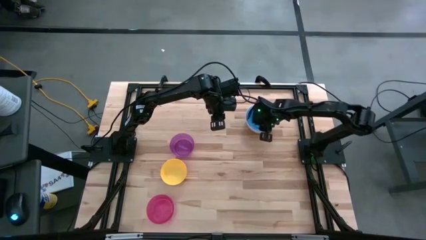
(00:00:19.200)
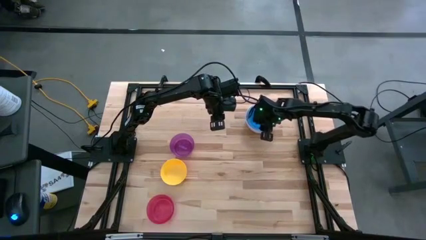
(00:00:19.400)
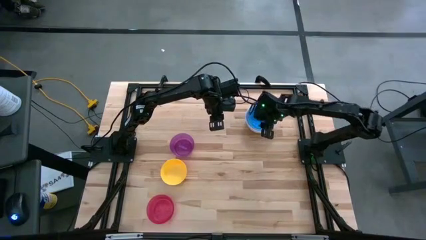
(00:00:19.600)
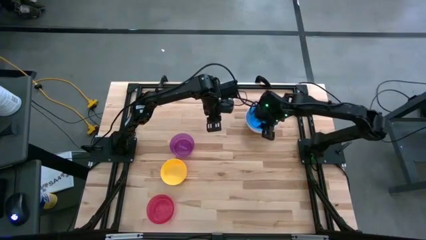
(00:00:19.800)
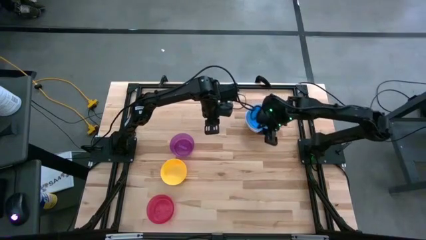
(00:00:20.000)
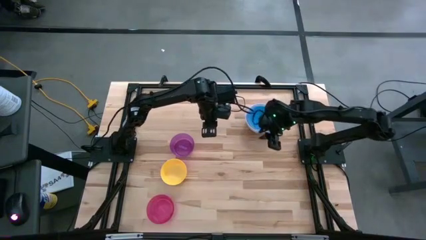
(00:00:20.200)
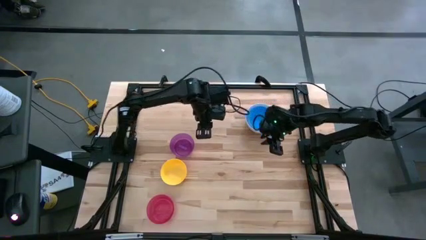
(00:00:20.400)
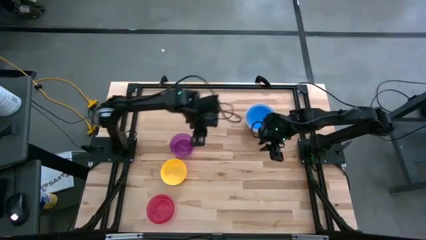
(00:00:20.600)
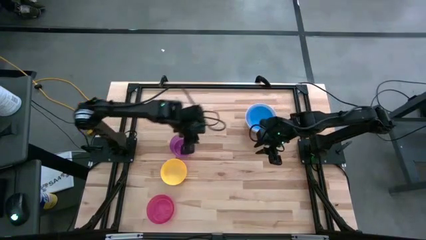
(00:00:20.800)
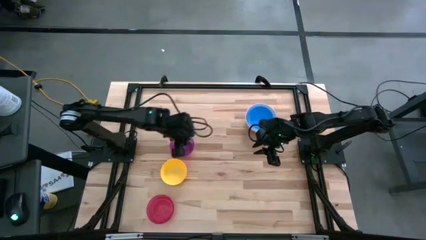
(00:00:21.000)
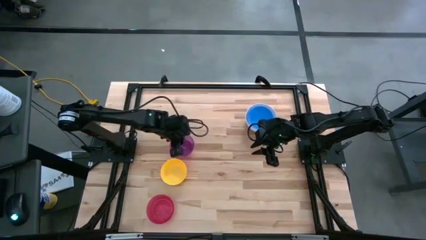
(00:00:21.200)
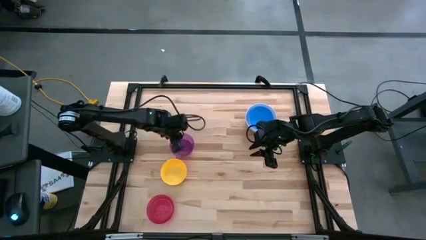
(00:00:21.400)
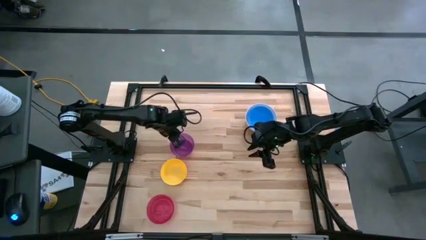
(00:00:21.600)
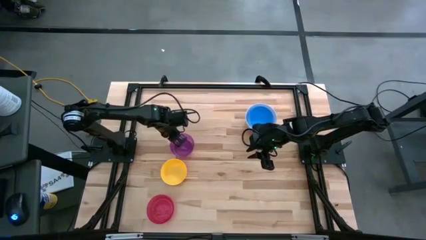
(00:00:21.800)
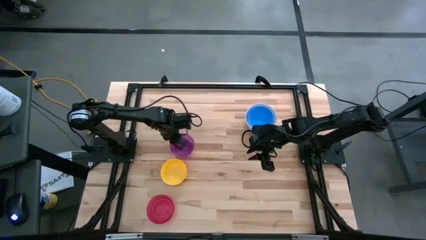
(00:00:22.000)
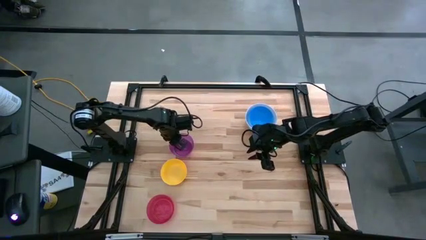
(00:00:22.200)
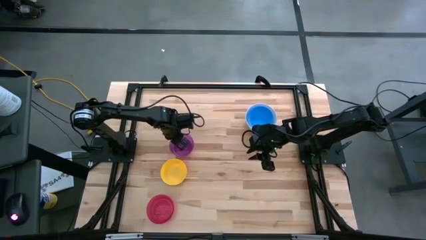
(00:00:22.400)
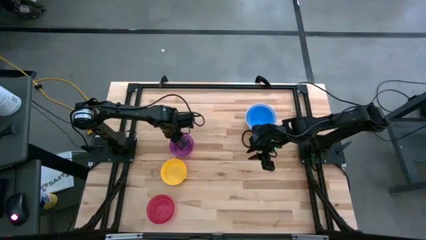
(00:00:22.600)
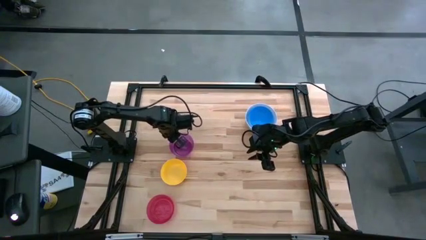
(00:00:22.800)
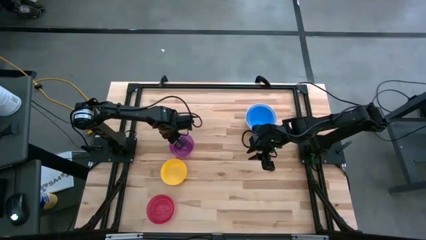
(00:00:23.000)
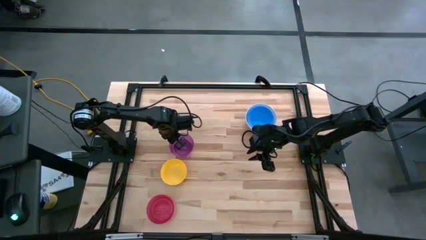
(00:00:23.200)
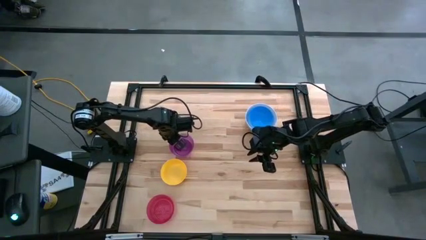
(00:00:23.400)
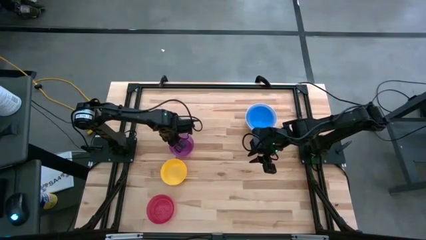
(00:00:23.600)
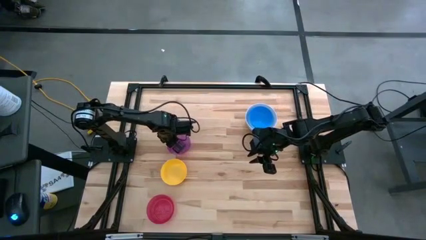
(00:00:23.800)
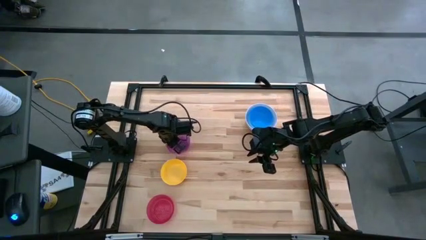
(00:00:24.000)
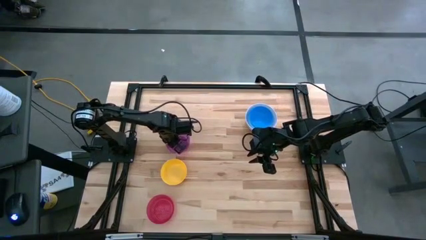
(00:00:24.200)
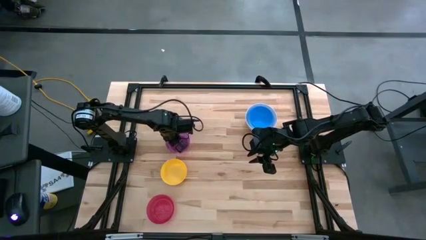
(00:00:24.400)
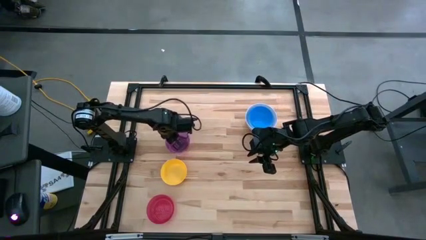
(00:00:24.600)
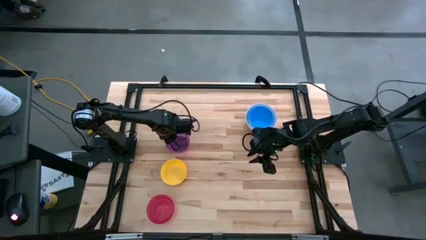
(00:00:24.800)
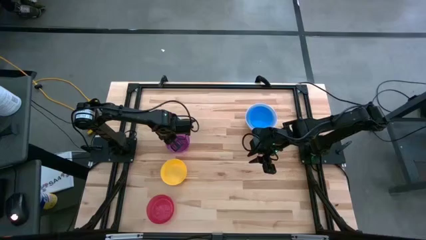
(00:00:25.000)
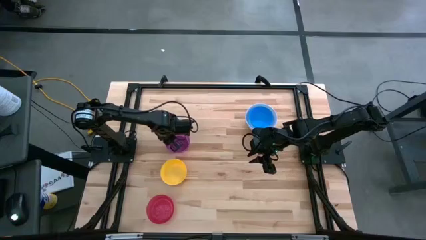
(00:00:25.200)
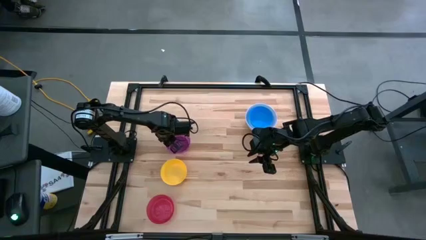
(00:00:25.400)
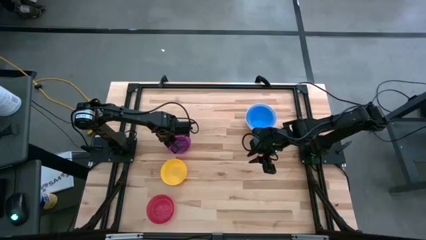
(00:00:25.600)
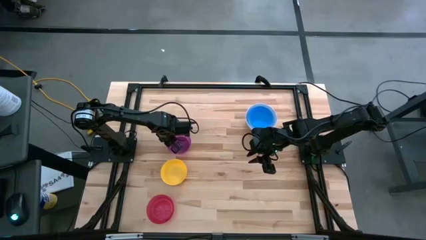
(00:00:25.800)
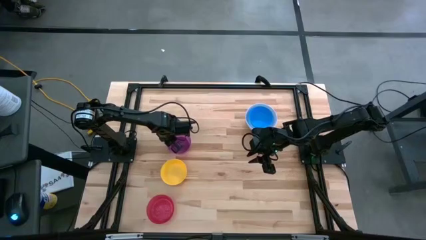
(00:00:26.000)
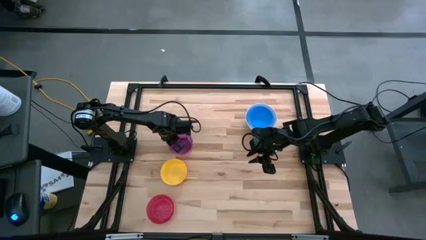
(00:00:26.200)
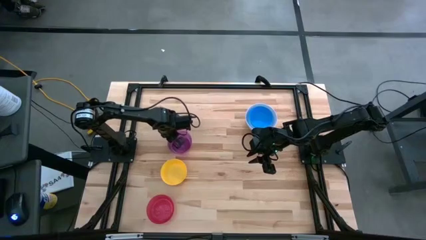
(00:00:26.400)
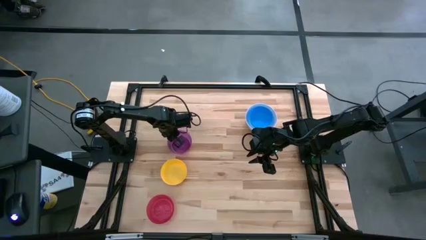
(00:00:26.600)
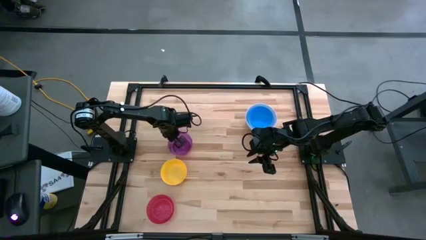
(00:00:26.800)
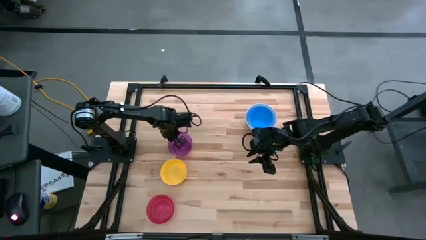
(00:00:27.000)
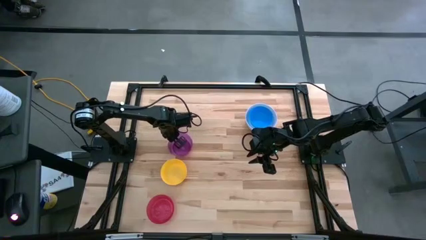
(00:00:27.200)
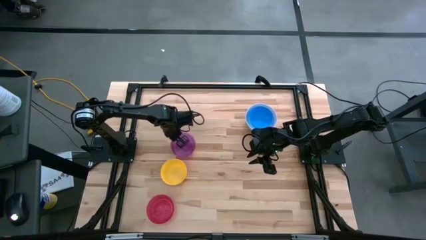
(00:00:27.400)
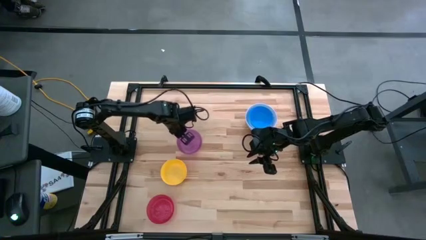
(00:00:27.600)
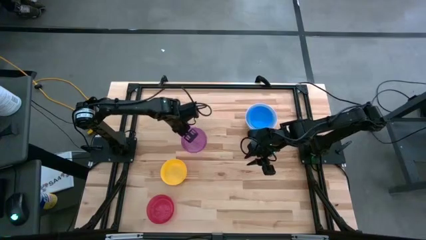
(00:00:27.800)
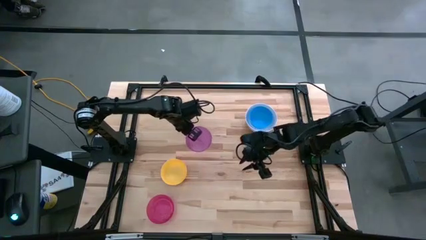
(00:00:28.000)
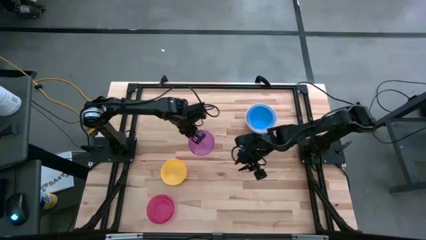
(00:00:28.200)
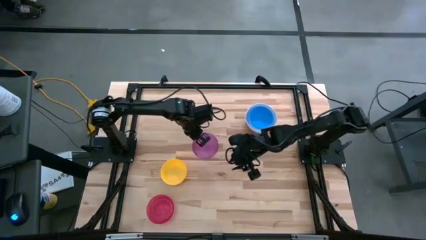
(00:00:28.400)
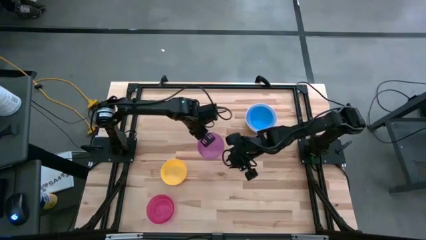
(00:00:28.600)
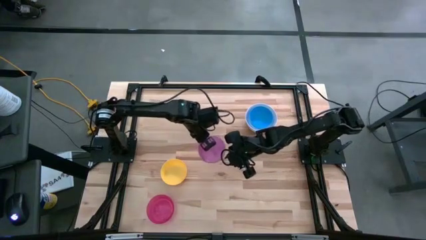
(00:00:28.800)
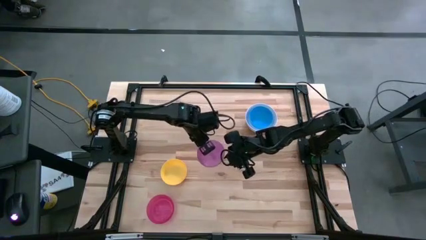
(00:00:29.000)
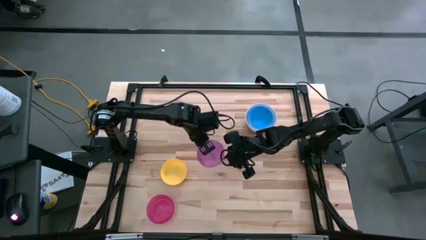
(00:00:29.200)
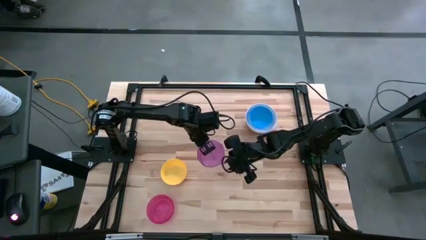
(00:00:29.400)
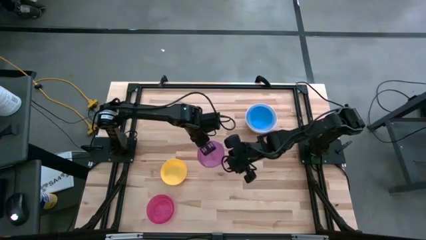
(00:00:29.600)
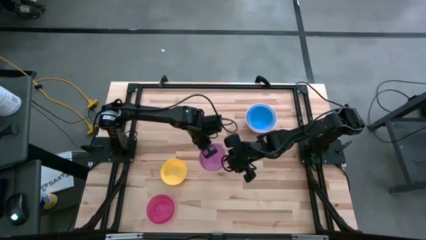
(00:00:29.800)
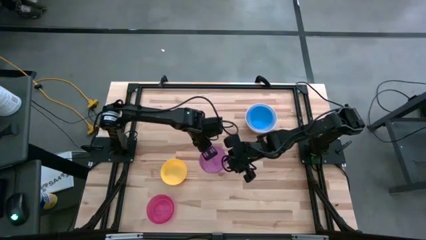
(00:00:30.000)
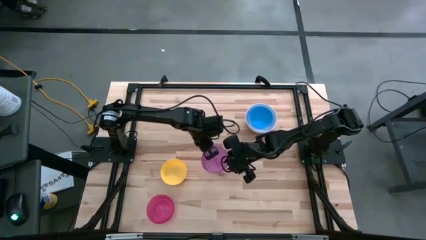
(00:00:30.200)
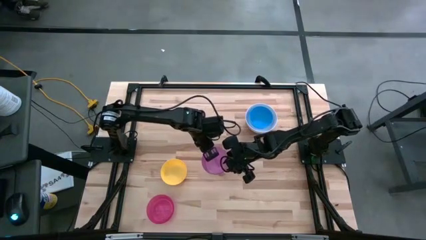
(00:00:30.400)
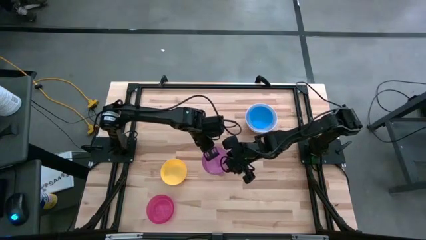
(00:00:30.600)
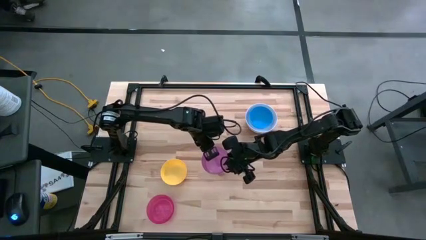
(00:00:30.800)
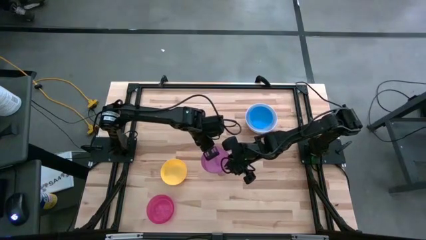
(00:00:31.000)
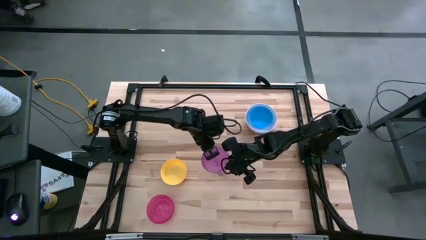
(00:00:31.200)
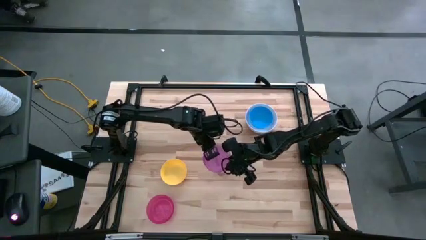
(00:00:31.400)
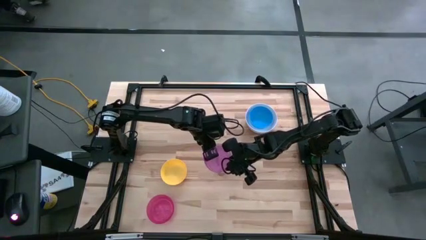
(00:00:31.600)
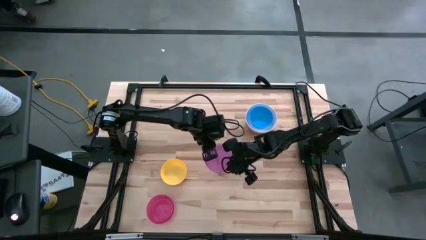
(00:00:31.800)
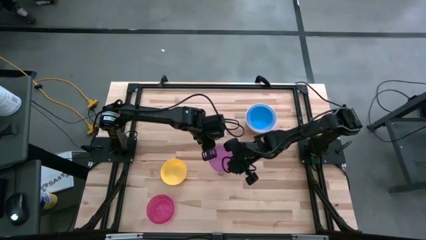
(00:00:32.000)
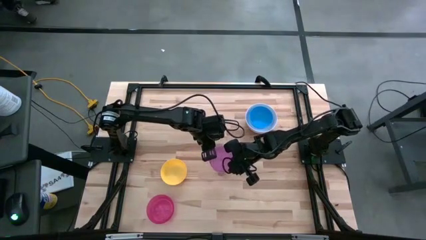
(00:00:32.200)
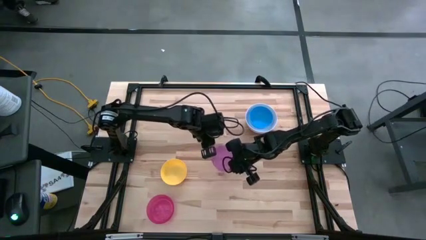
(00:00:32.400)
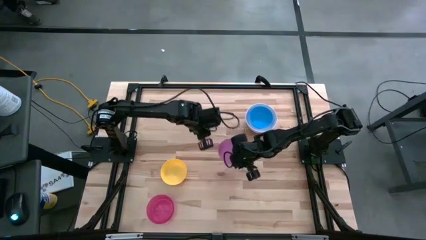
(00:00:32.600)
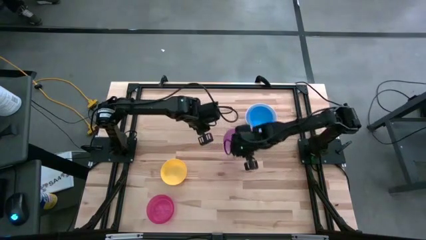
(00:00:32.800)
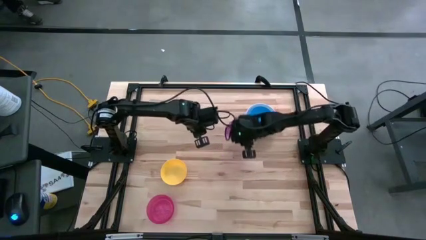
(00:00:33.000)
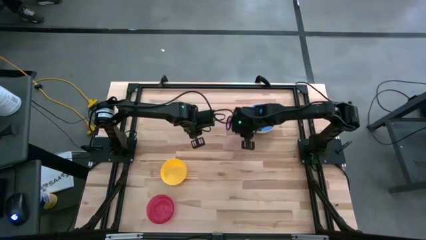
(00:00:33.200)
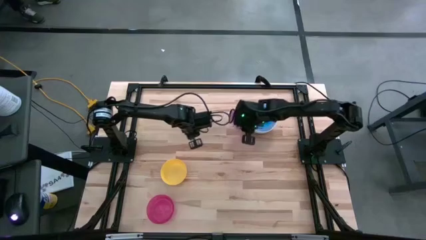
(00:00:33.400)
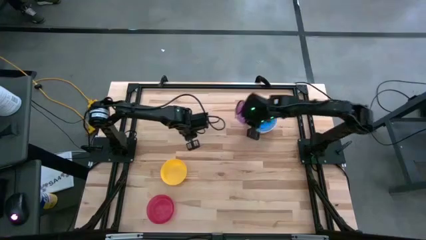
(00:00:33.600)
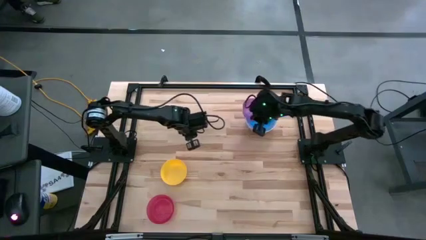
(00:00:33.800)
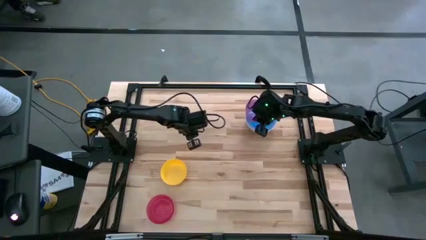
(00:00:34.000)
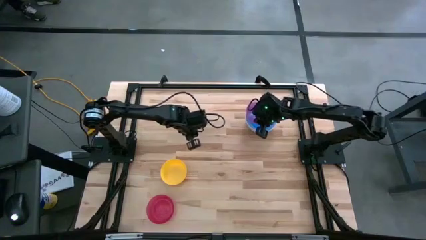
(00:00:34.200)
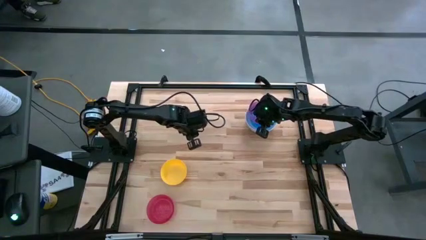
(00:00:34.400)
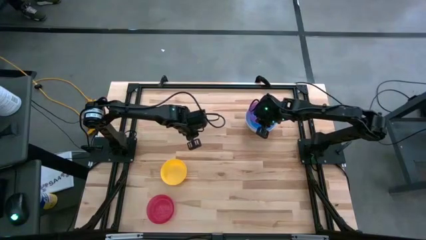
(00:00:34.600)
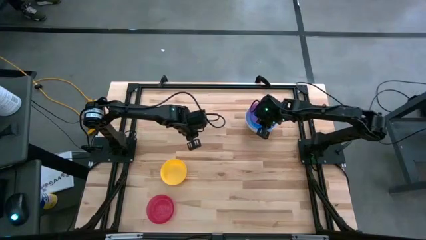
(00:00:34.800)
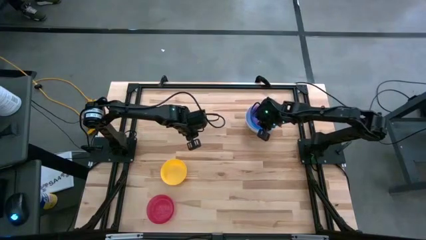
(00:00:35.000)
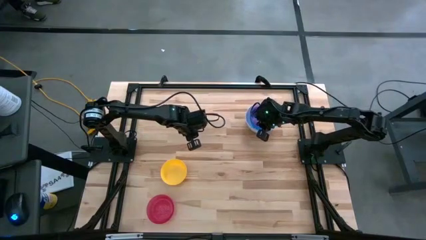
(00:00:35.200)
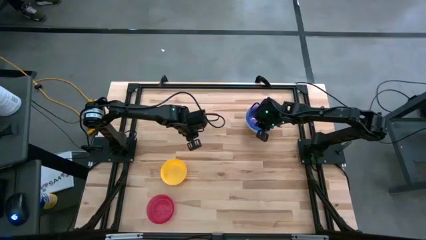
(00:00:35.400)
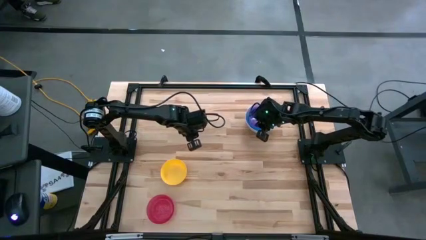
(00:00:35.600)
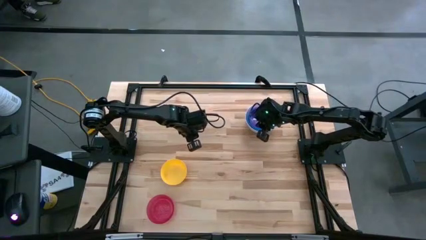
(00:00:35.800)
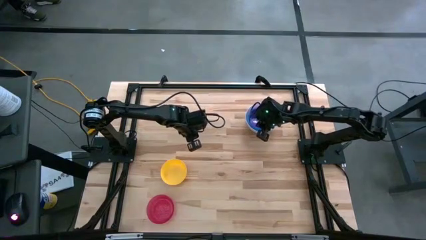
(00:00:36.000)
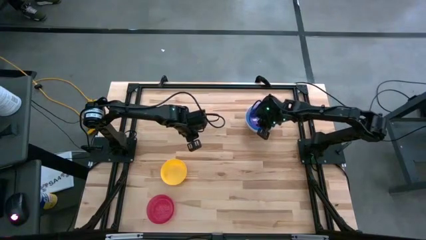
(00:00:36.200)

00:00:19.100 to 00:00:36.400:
Stack the purple bowl on the blue bowl
